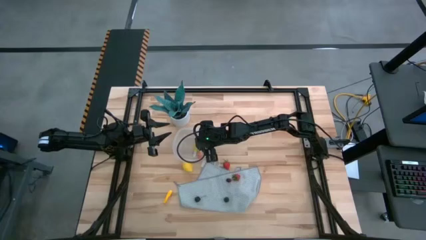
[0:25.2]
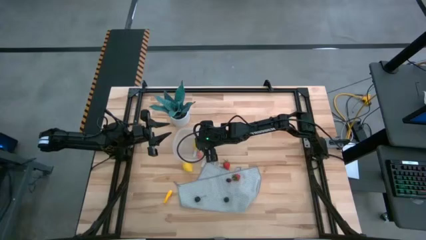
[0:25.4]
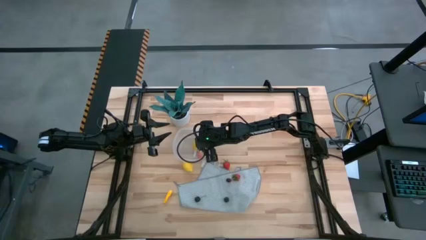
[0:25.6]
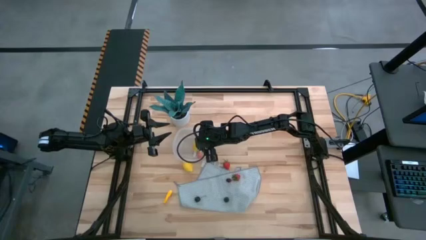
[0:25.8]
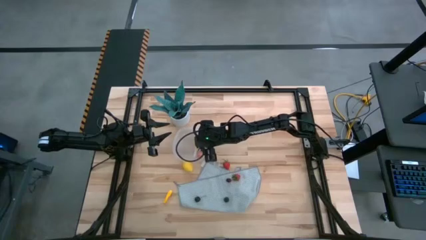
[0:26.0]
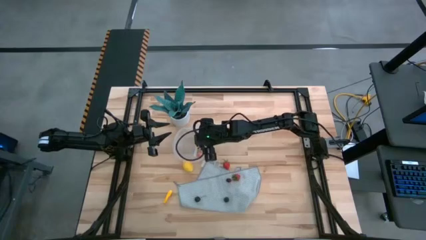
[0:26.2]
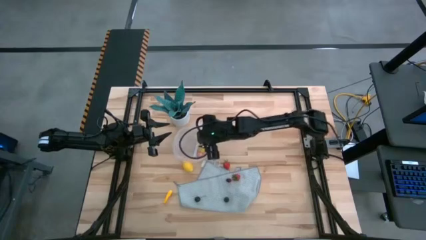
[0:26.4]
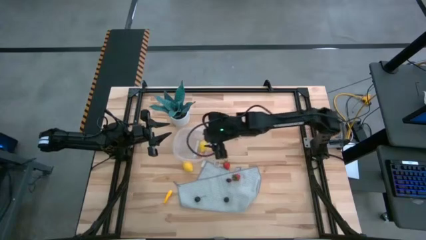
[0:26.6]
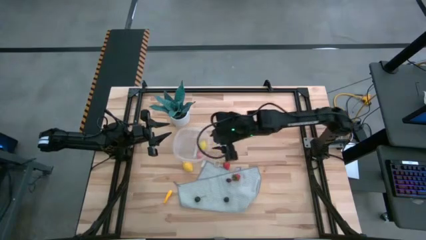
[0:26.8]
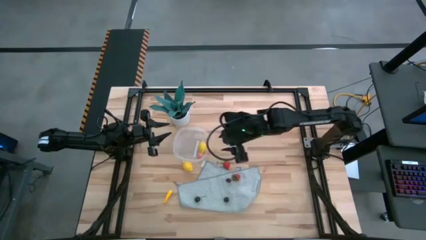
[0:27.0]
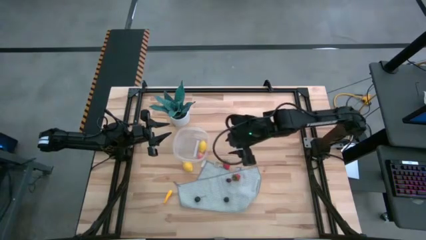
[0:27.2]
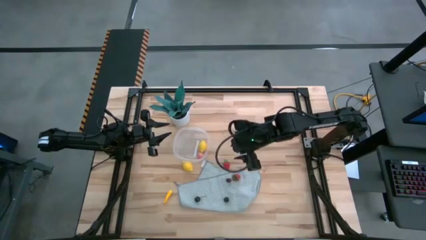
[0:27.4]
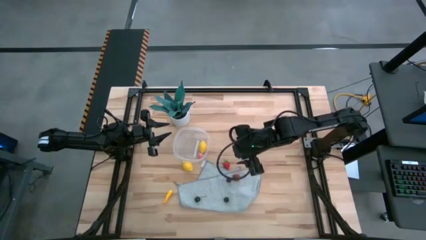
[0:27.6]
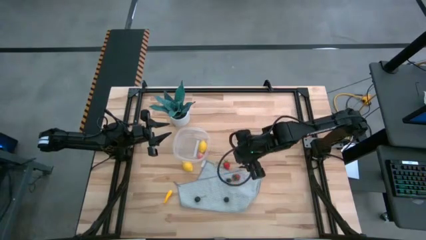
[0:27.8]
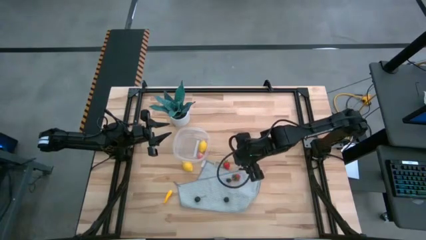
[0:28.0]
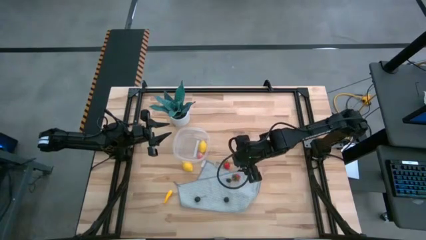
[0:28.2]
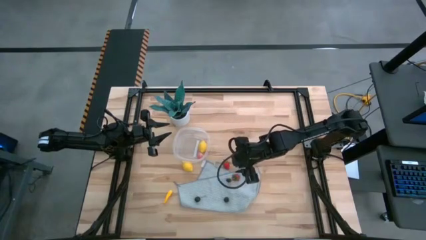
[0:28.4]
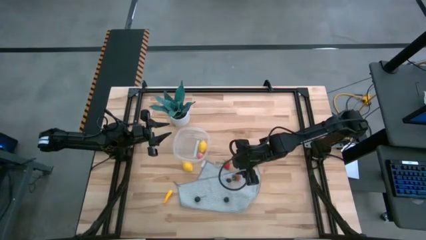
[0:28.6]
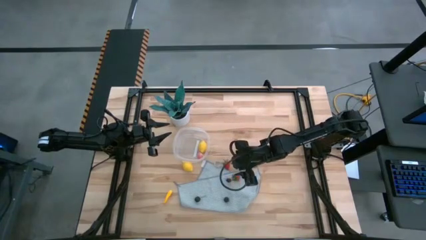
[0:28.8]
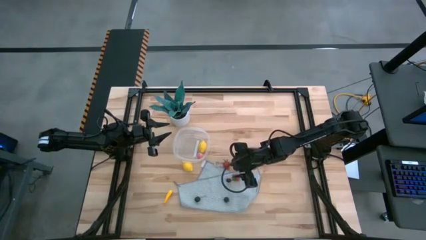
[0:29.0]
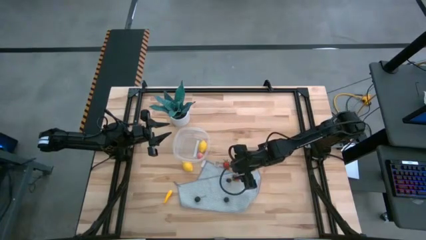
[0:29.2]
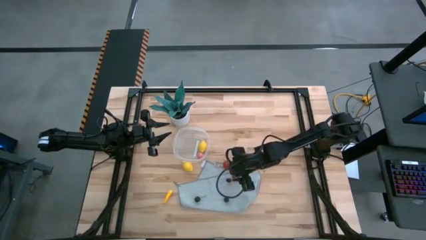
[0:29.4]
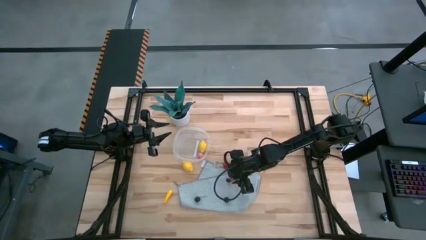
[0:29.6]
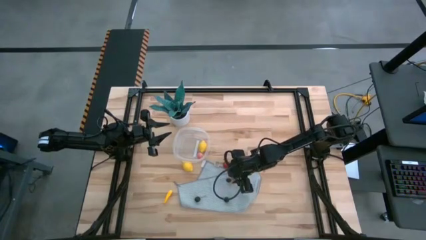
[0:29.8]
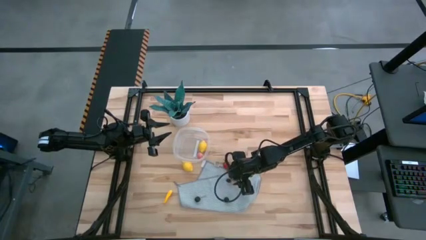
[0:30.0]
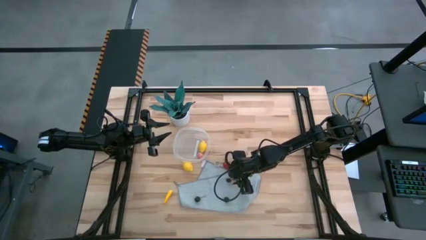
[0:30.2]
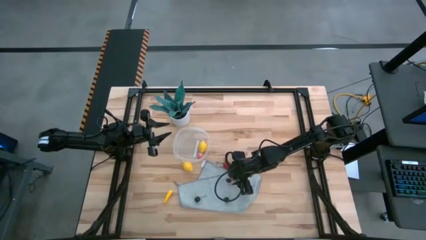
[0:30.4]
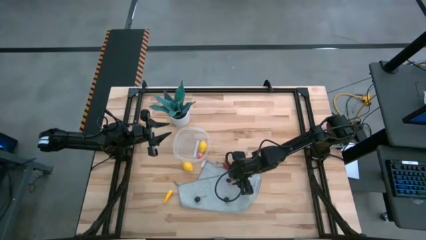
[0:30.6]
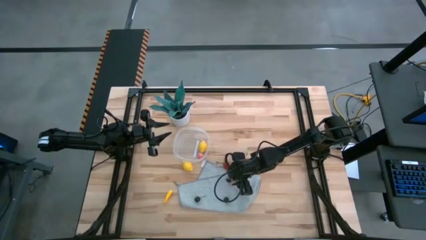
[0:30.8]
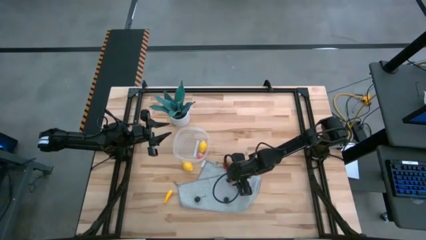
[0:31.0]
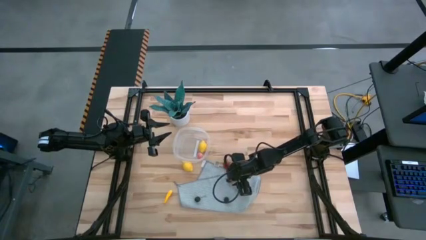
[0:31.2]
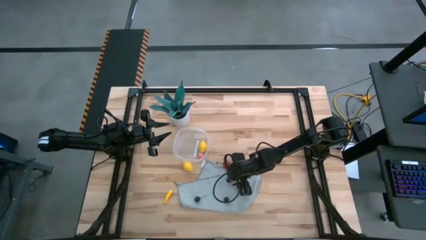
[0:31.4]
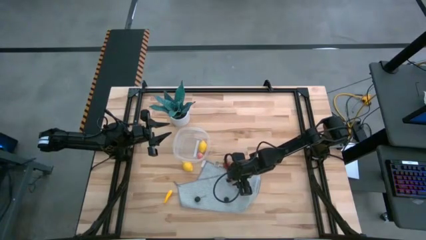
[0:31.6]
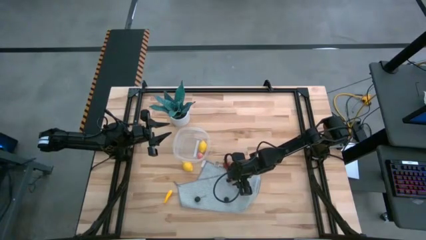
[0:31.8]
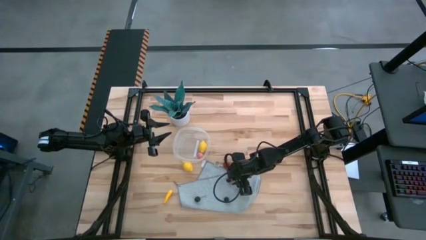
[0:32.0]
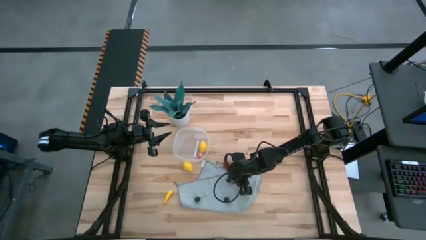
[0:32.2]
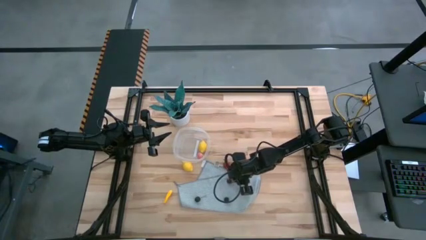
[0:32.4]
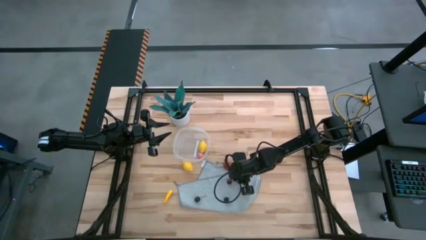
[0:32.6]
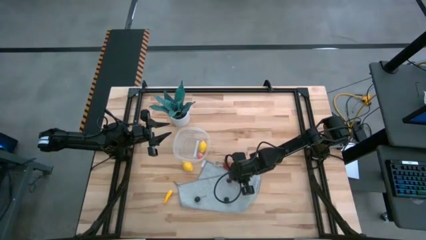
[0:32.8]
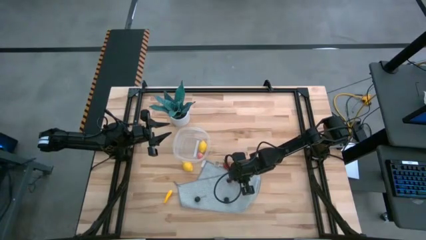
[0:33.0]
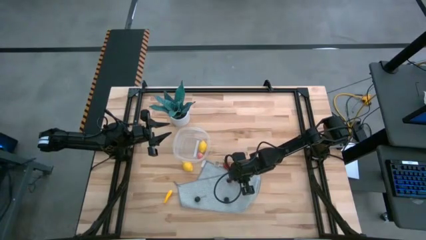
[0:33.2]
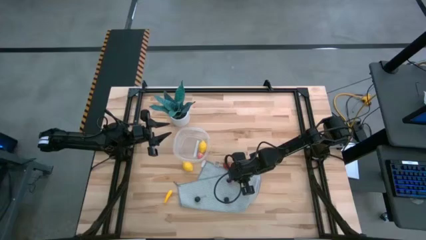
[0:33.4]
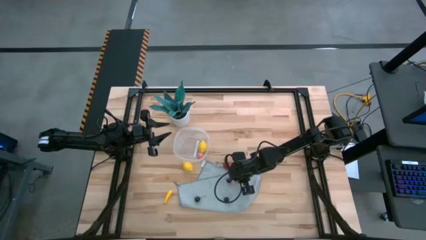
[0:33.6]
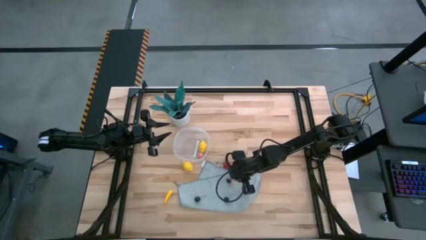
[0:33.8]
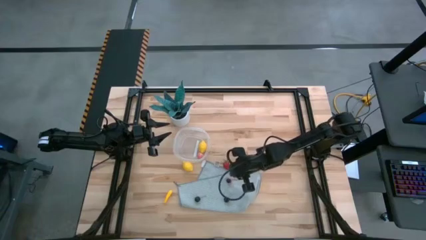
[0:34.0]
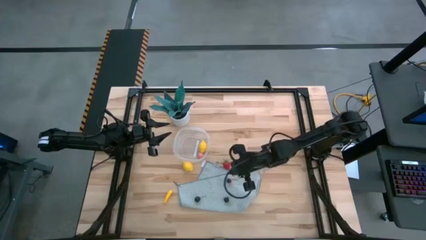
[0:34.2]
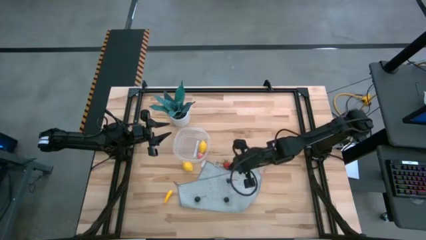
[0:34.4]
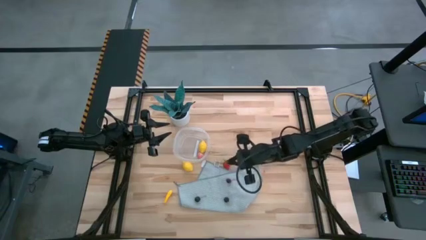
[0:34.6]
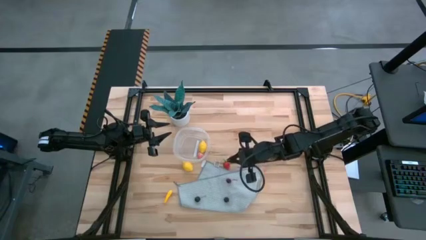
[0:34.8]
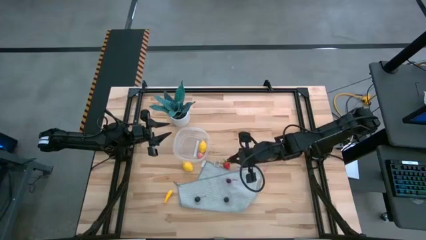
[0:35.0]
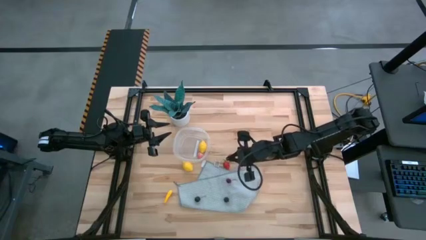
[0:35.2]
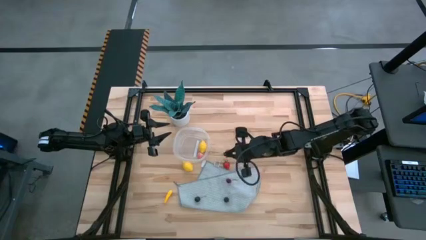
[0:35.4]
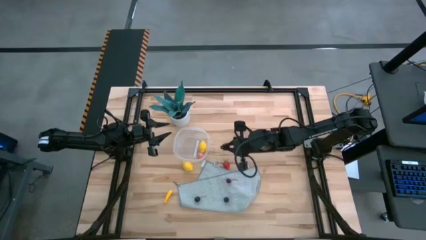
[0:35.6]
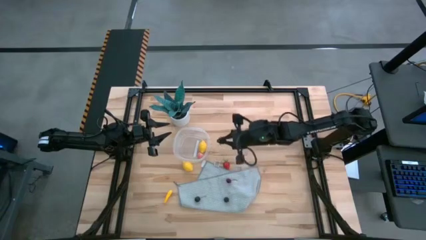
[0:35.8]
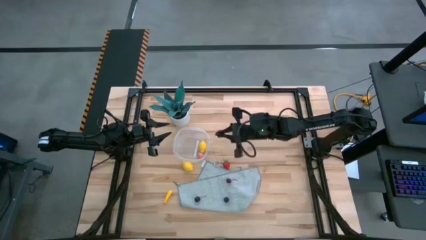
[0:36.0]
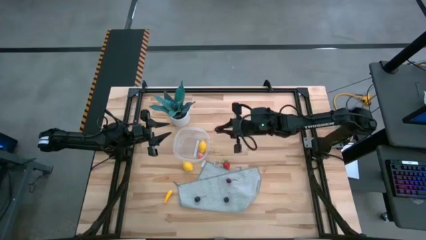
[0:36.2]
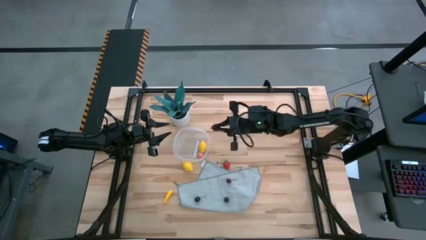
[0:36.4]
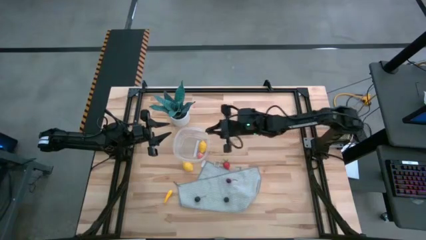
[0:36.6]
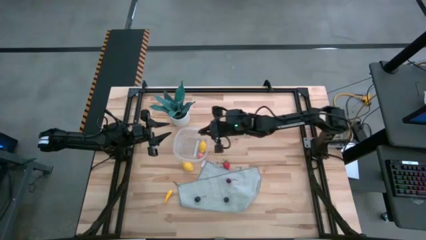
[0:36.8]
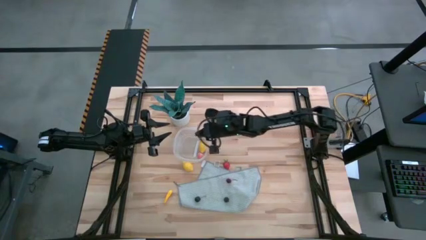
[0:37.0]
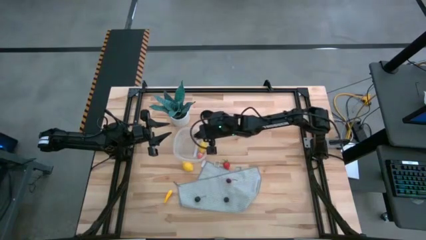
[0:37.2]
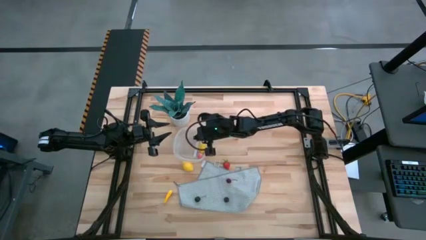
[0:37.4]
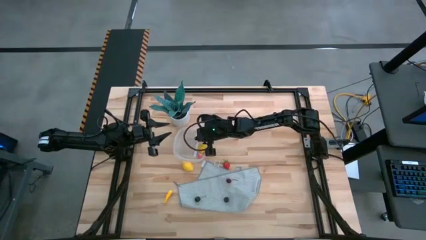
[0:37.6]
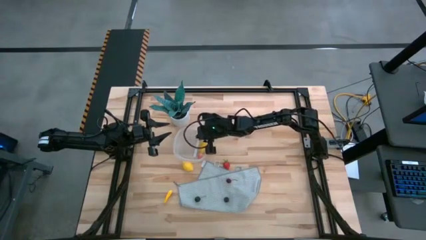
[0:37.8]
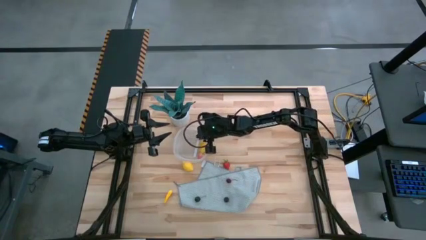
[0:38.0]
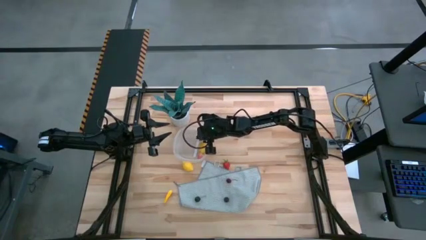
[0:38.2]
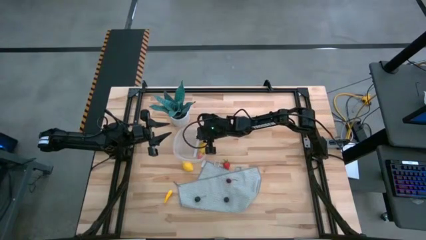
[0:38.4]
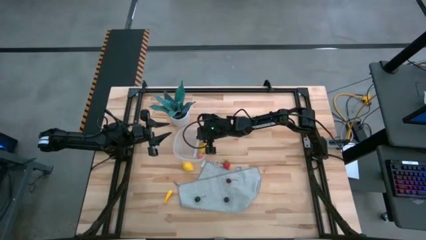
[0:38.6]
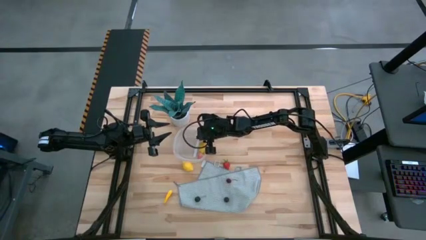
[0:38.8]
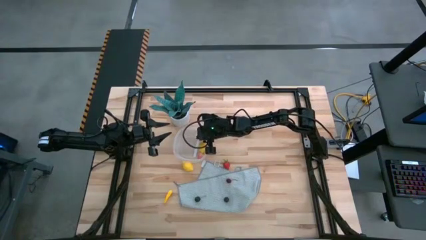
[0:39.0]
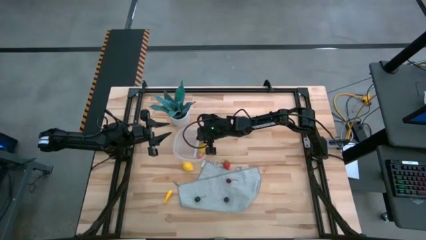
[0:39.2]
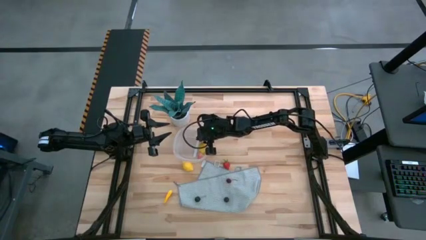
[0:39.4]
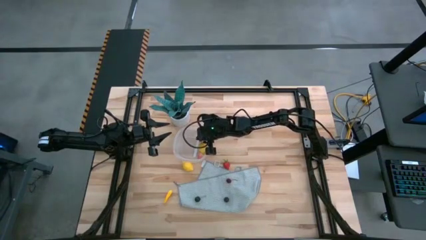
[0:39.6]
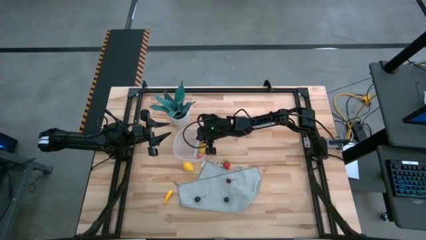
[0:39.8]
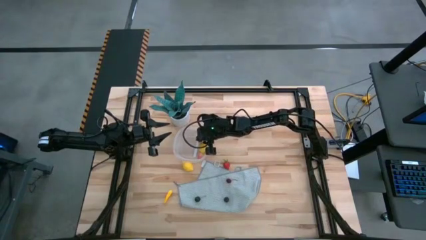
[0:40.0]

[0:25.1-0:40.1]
Task: Pick and placing Produce into tupperware
Put the bottom red strawberry into the container
